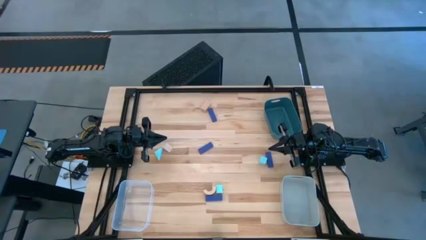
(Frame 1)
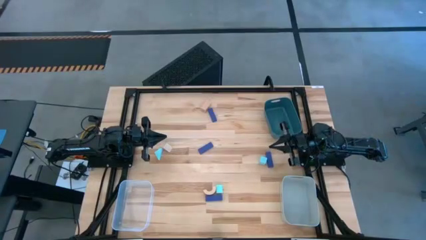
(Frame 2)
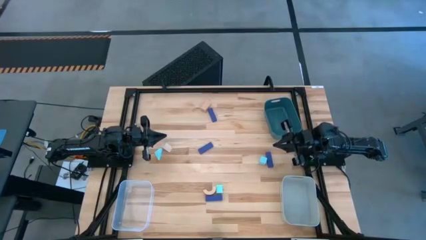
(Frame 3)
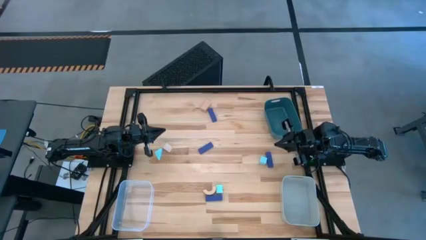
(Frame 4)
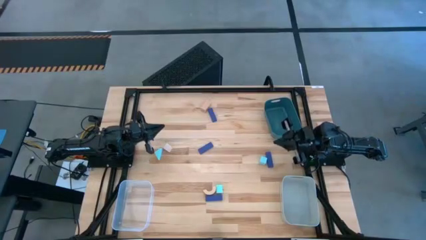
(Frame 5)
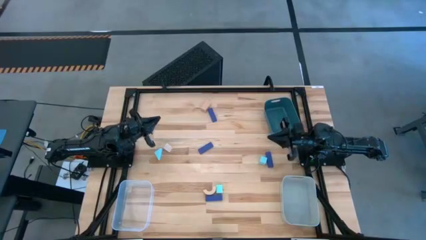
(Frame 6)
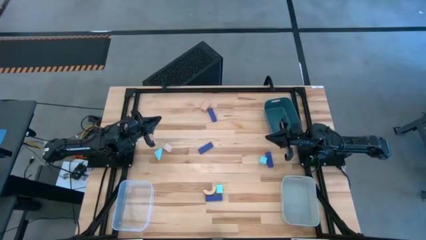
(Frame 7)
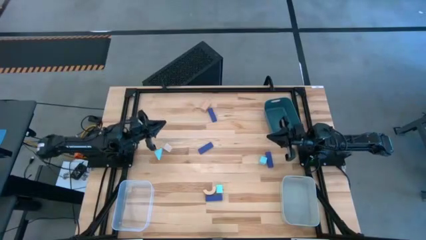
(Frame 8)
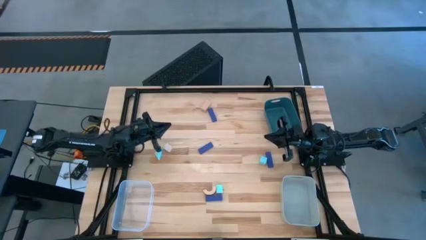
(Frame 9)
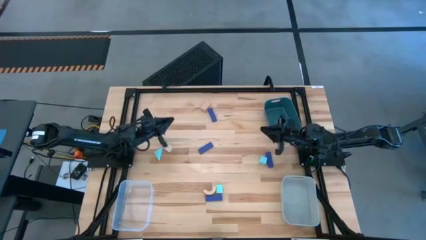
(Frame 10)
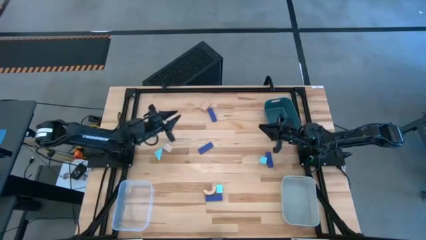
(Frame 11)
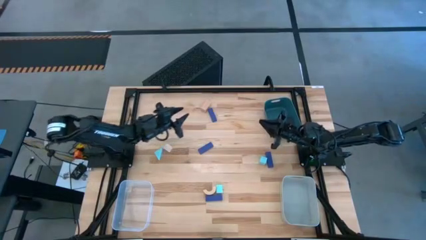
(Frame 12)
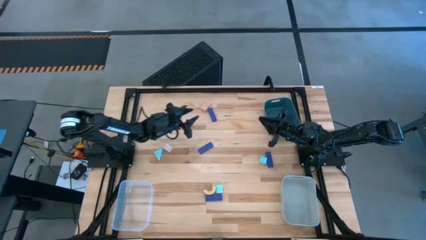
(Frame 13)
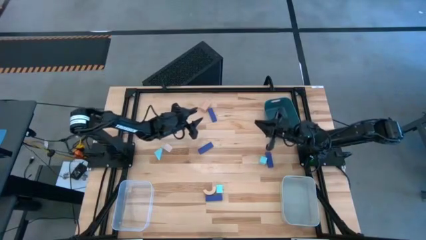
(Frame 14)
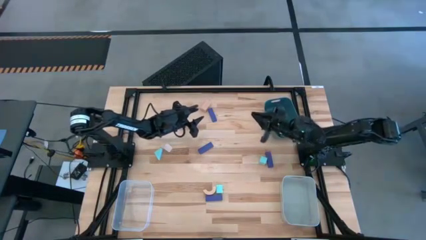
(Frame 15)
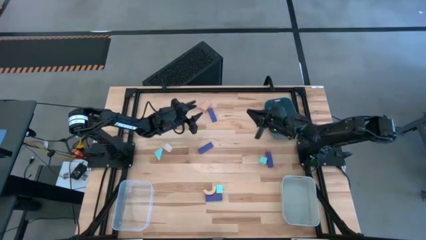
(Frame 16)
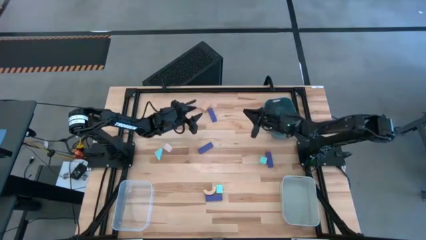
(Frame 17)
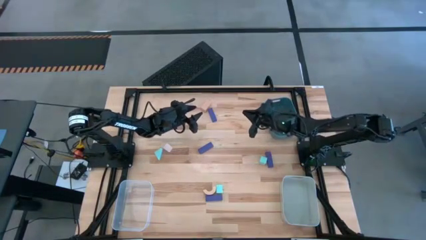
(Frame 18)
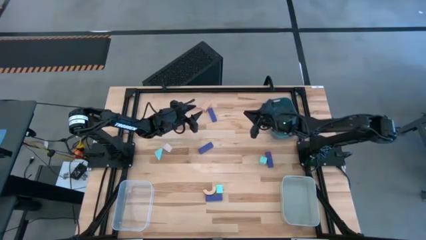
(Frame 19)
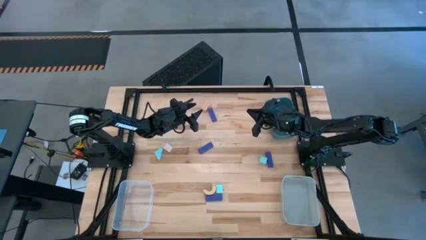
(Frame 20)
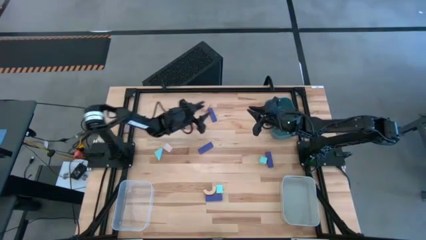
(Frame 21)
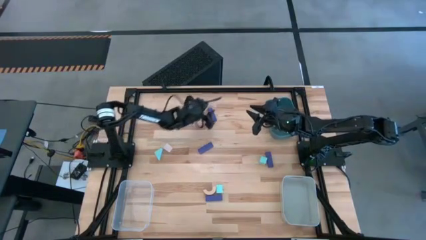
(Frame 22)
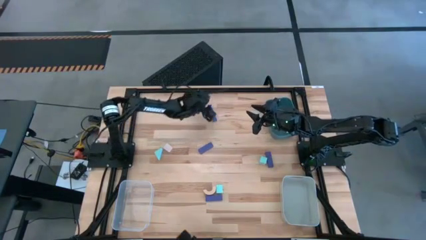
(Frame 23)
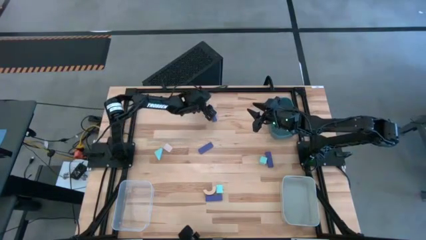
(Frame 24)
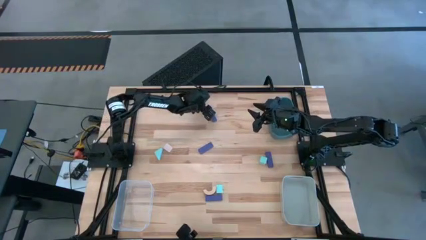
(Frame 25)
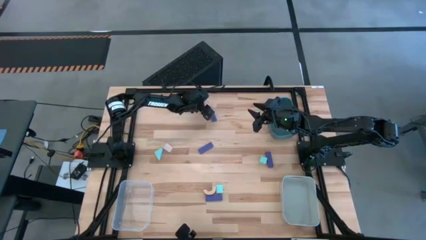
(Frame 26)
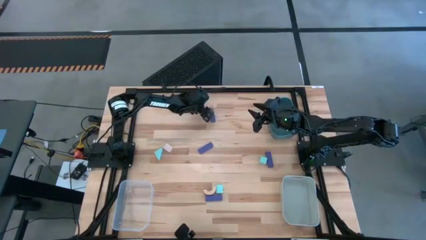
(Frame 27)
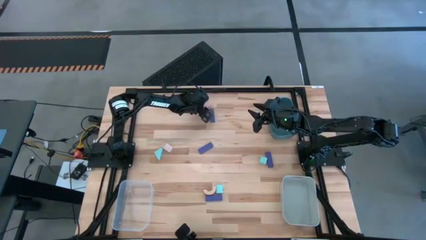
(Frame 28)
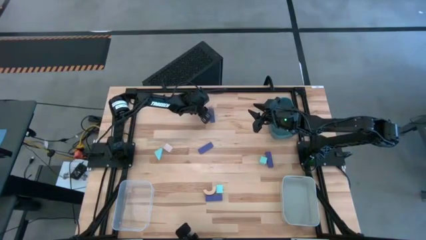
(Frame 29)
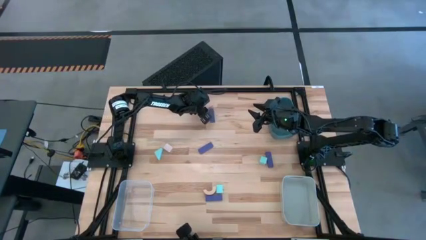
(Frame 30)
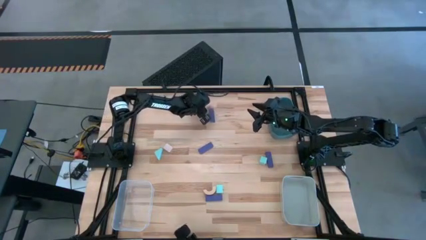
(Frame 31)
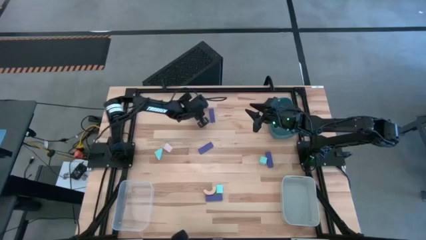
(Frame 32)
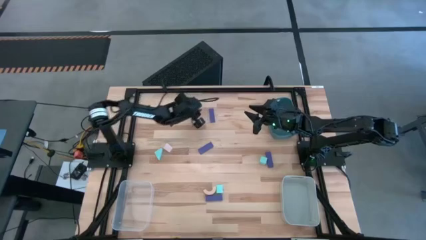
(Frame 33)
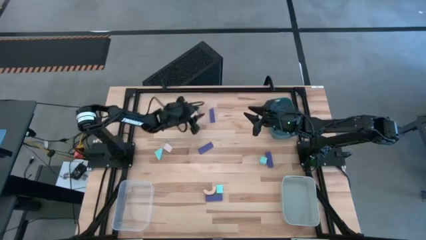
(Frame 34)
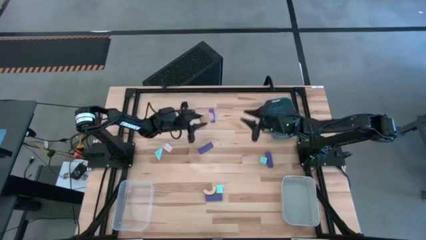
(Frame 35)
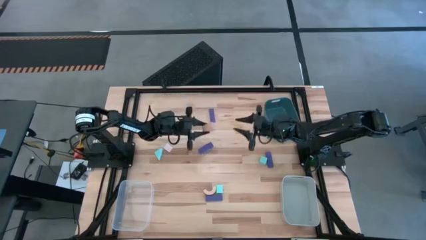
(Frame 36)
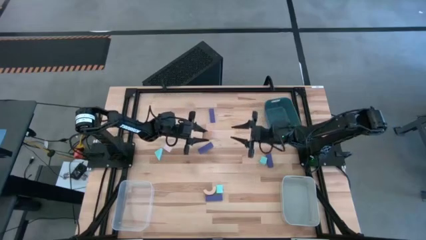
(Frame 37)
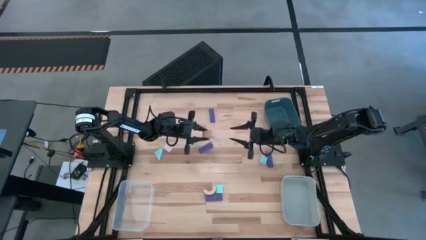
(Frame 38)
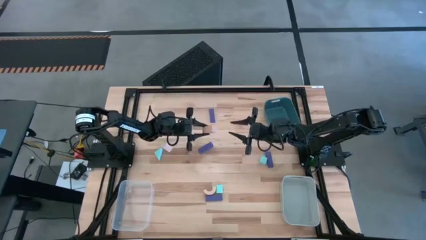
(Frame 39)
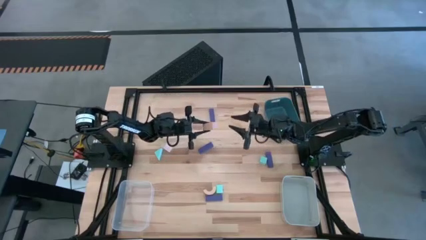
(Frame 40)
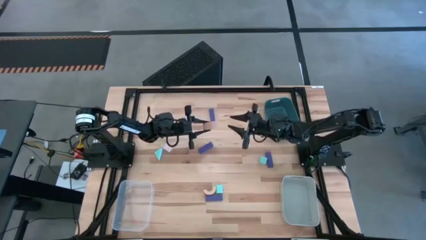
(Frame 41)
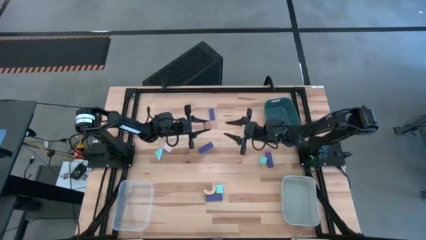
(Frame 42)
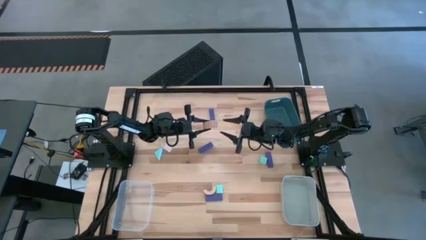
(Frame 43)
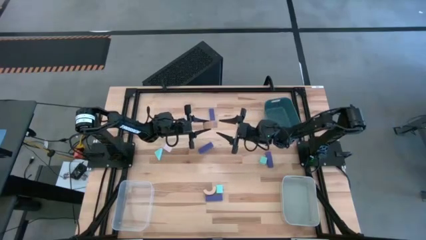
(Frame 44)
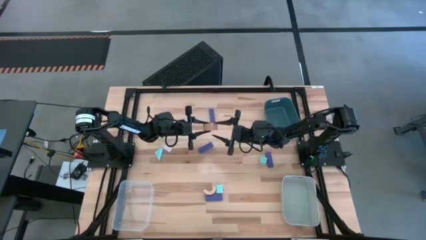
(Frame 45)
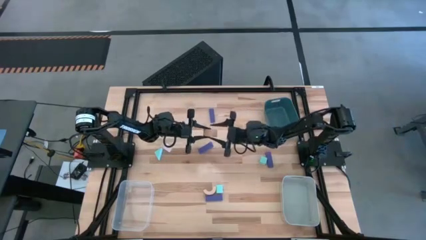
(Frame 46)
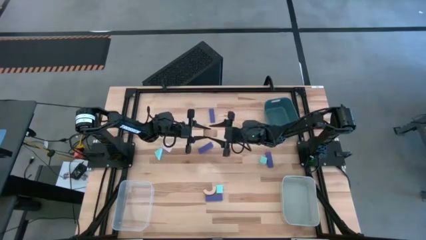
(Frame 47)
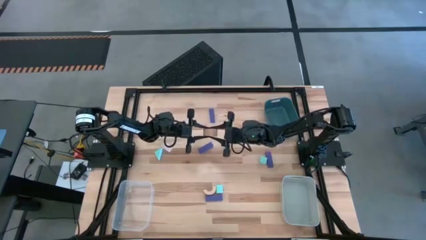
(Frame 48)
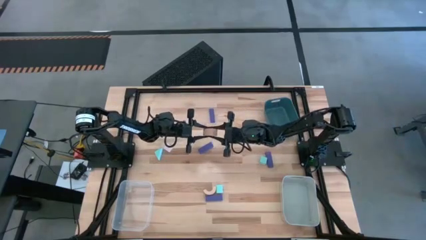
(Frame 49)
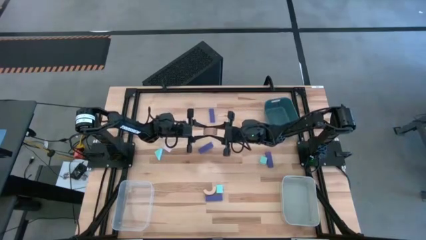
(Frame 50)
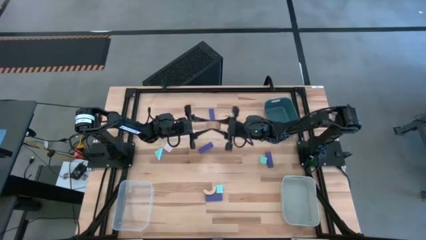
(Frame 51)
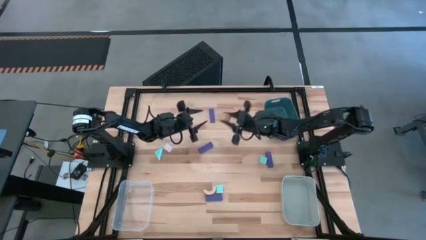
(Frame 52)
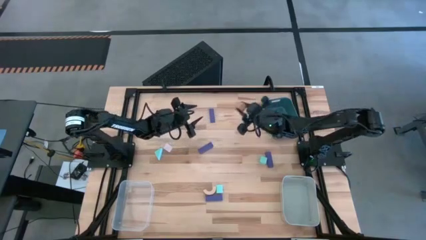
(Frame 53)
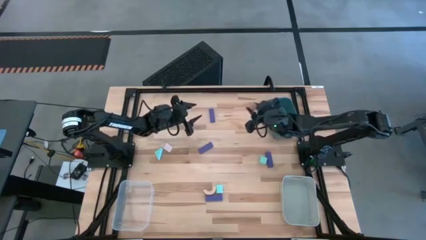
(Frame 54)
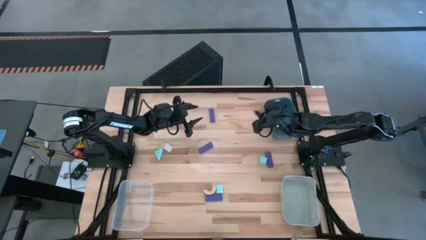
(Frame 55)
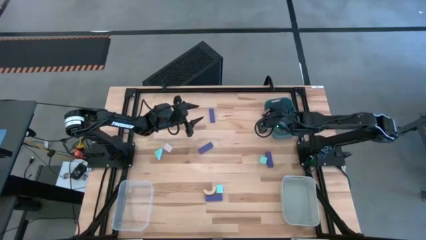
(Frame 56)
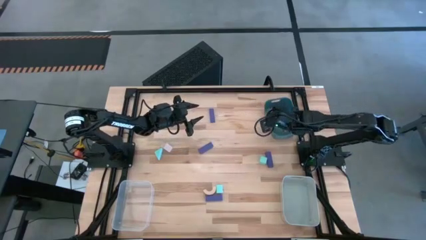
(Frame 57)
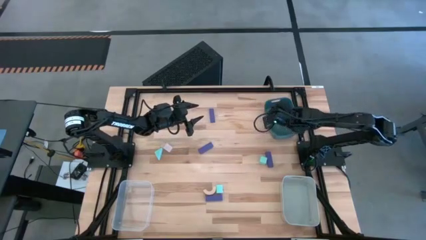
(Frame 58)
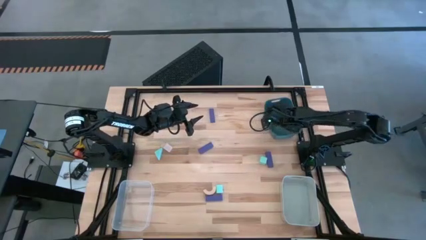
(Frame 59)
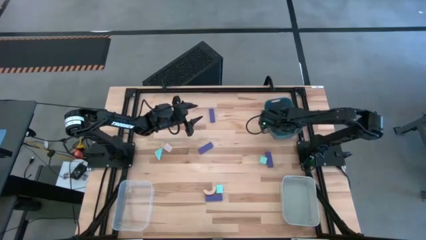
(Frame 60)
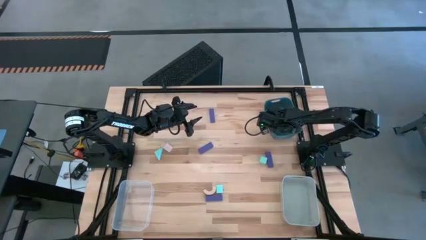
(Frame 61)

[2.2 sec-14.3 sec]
Task: Sort & place blocks by color
Put the top center light brown block into the light green bin

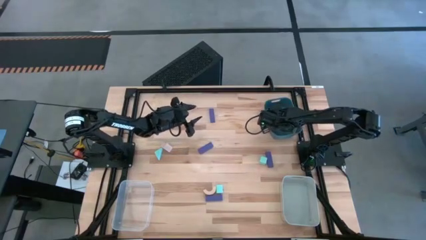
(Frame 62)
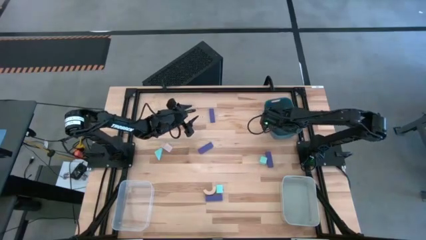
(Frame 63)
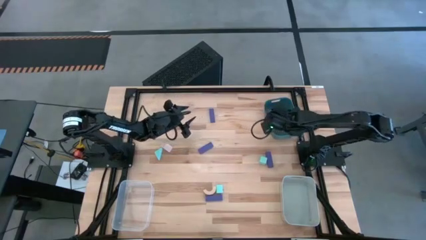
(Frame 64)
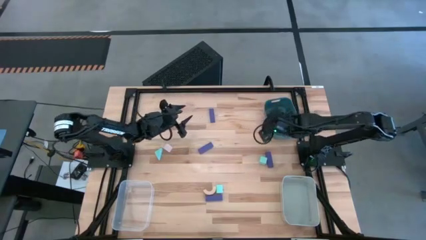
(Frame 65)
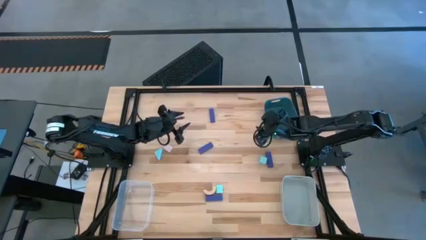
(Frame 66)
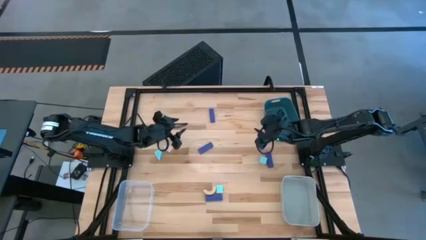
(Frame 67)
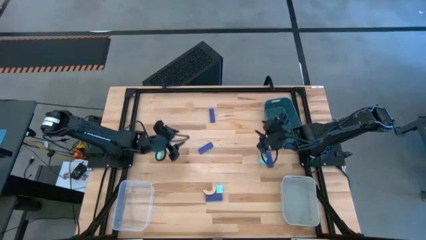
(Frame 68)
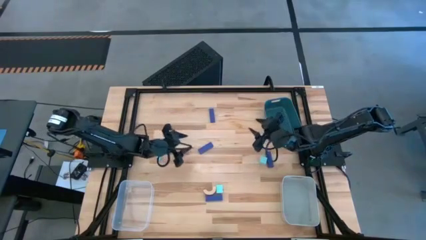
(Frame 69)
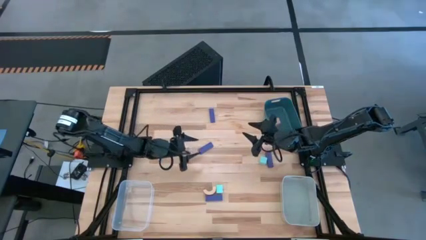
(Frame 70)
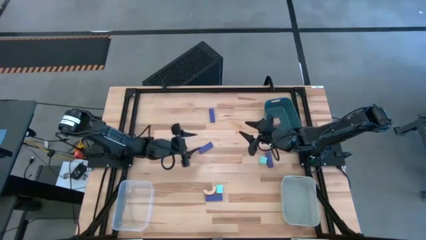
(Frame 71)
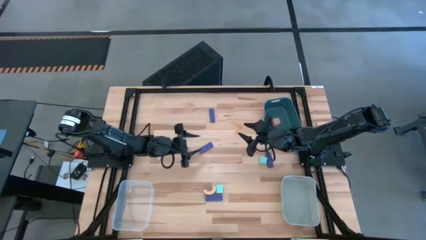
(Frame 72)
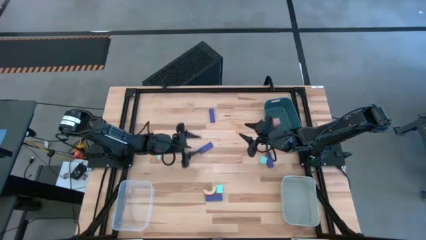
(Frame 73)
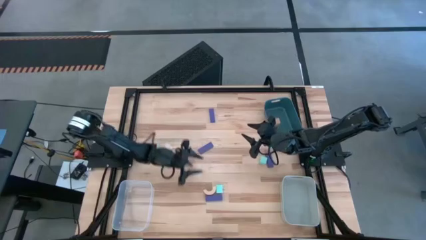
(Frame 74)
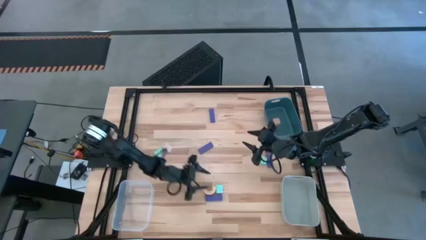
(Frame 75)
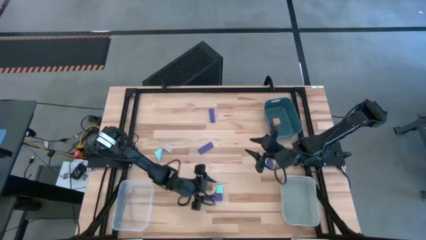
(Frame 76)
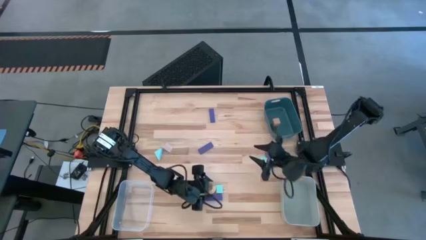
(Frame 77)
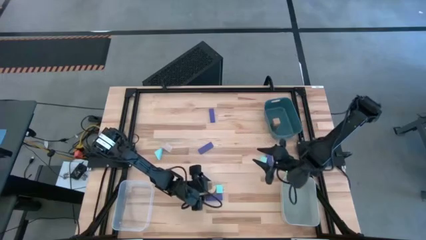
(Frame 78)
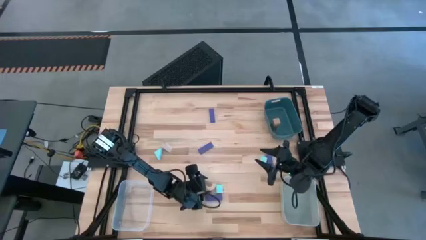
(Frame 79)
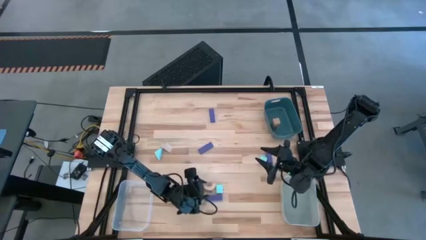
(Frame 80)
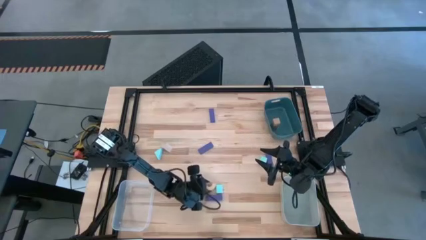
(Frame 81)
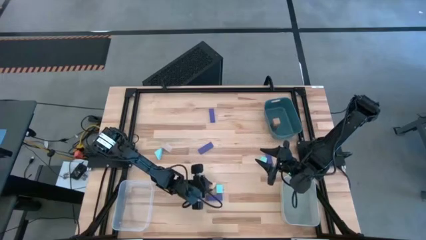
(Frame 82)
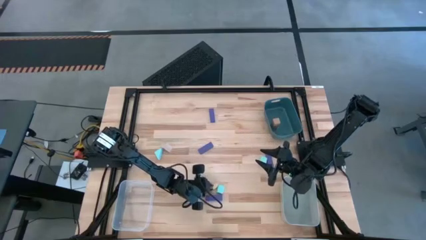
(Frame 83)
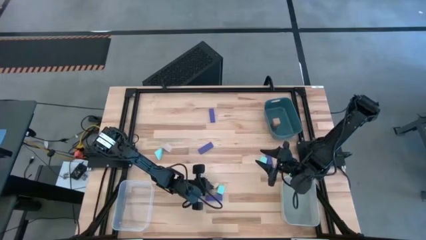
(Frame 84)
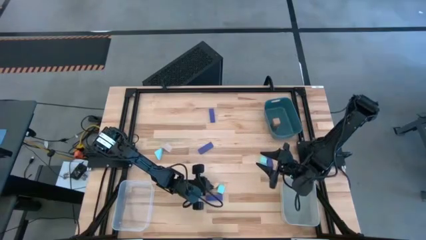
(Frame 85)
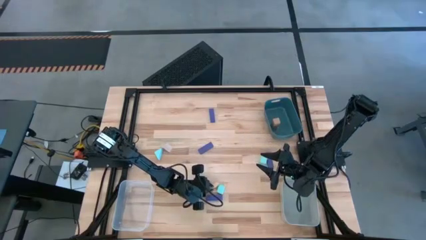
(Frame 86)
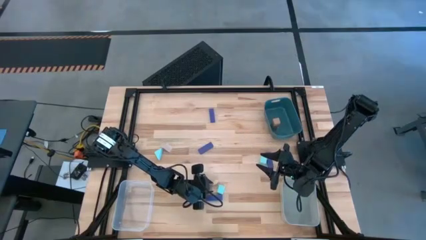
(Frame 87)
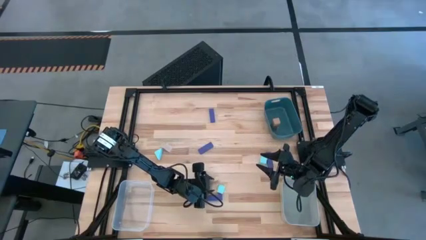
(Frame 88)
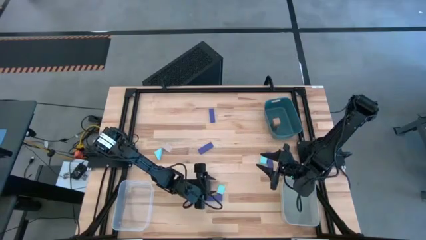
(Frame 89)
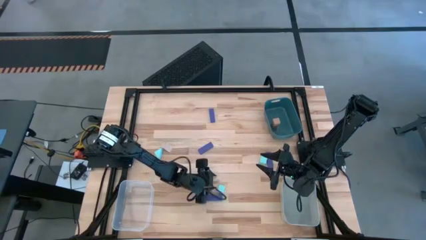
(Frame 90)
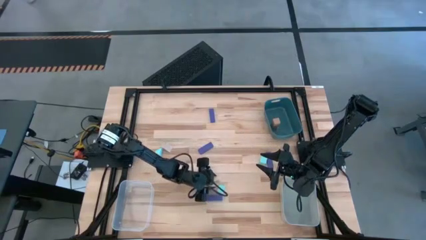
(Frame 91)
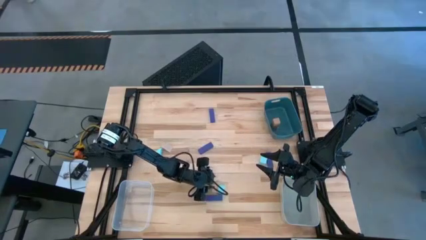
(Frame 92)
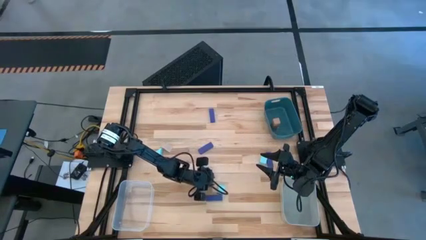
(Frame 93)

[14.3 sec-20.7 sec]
Put the bottom light brown block into the light green bin
